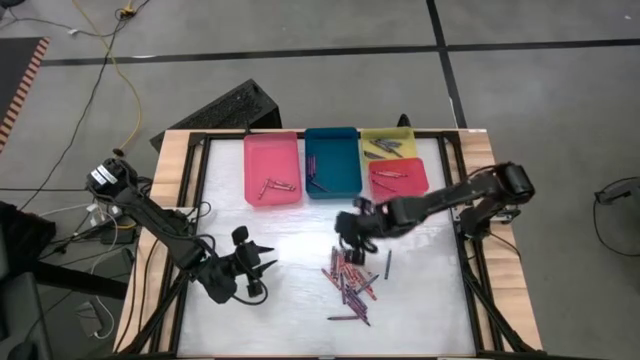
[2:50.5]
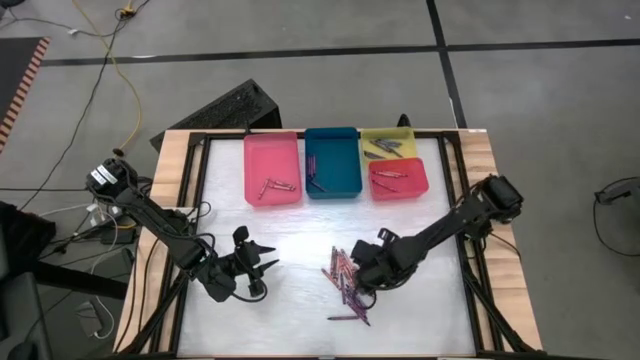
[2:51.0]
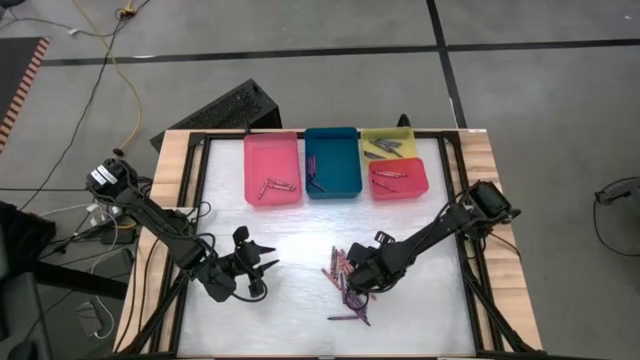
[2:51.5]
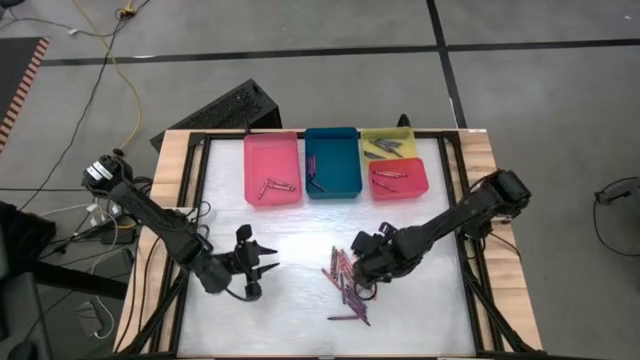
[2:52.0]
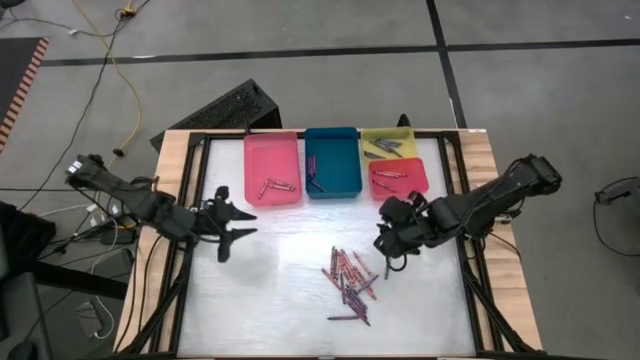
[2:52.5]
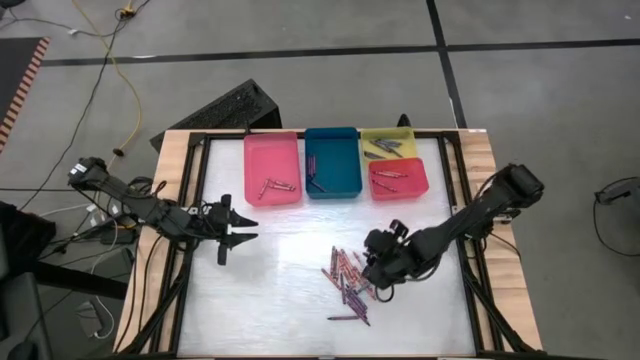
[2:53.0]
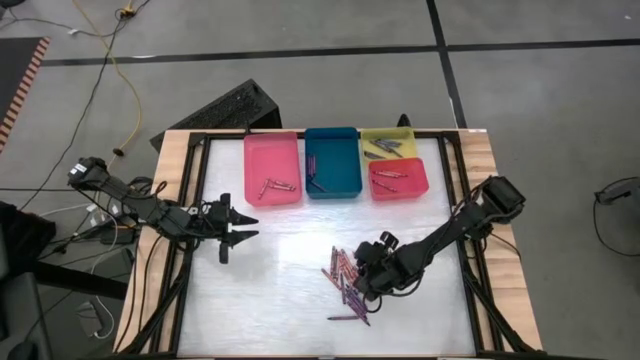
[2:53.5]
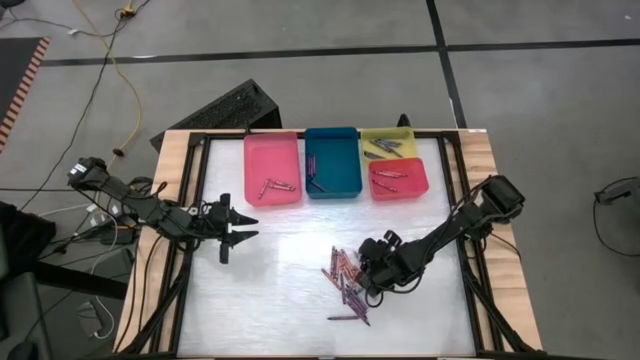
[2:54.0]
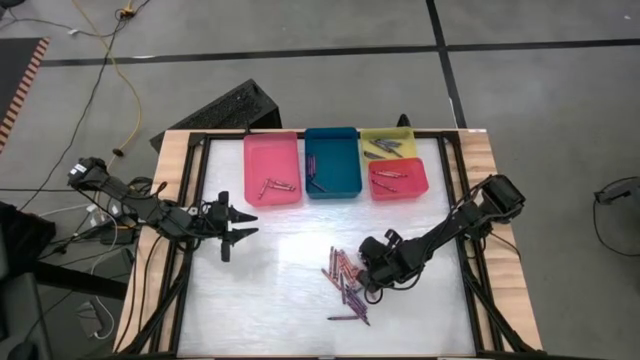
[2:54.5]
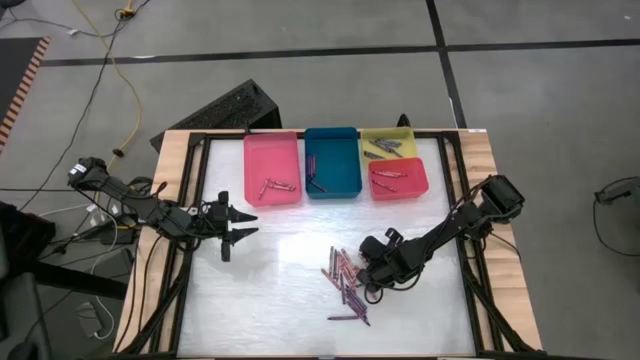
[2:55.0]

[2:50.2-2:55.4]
Task: Sort crayons
Put the pink crayon into the pink bin

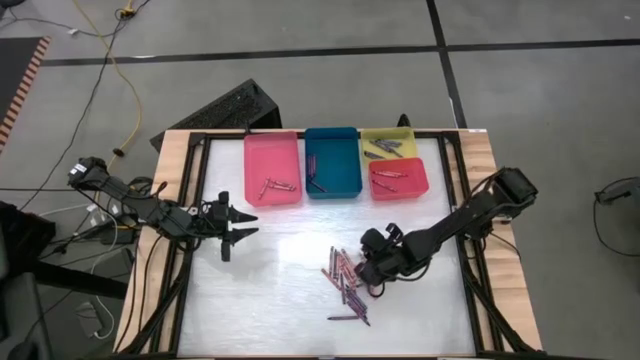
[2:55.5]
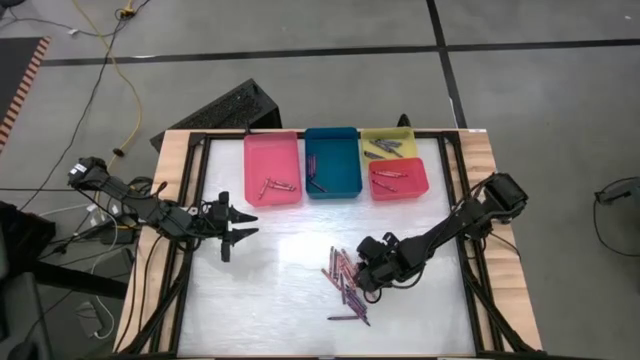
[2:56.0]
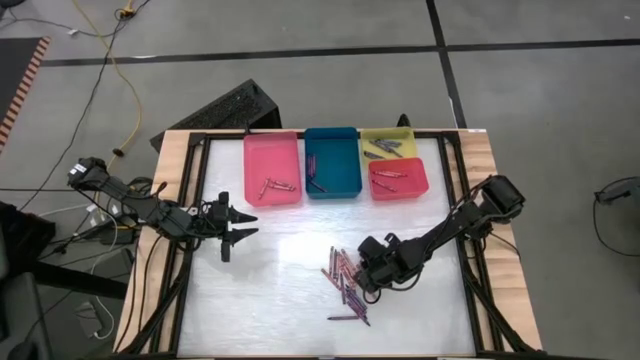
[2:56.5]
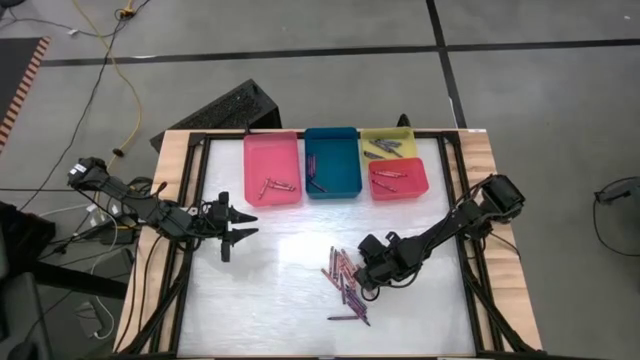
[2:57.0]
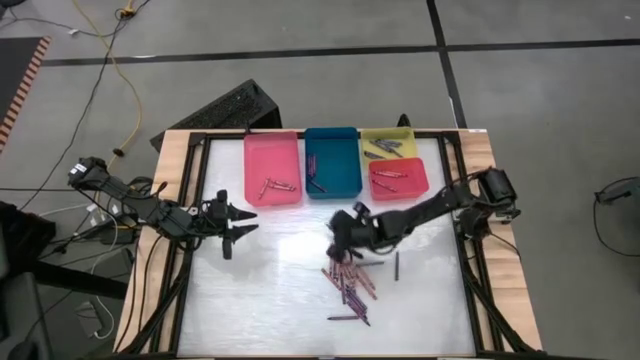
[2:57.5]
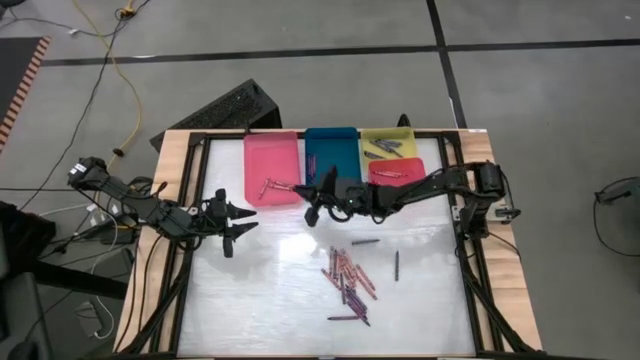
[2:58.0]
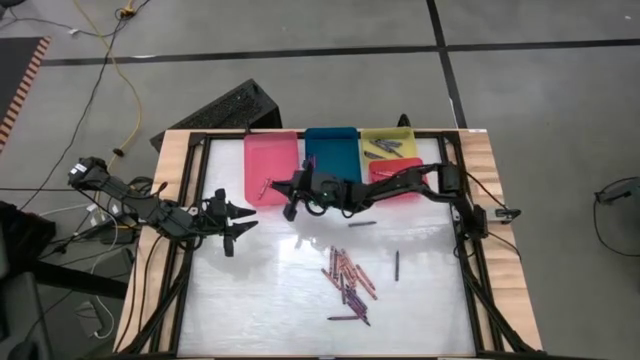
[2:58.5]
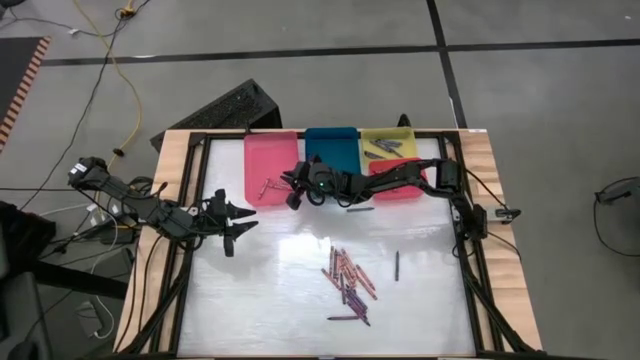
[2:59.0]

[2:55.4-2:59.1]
Put the pink crayon into the pink bin

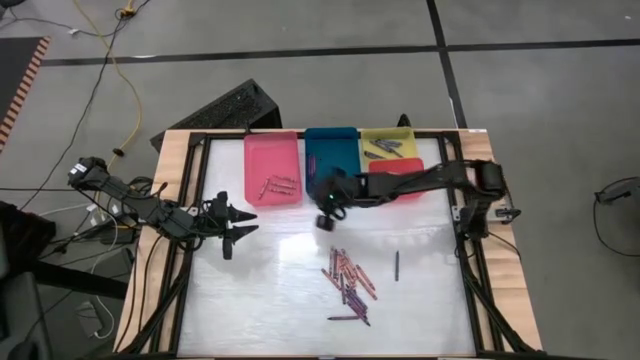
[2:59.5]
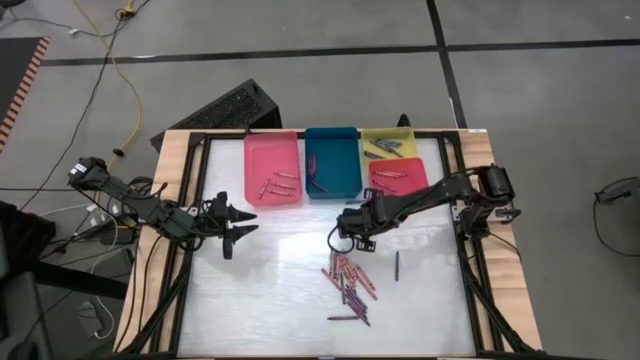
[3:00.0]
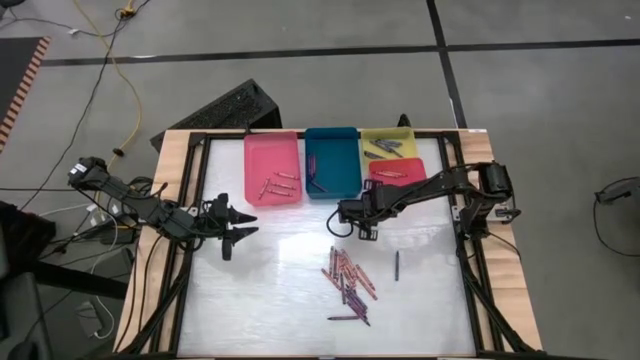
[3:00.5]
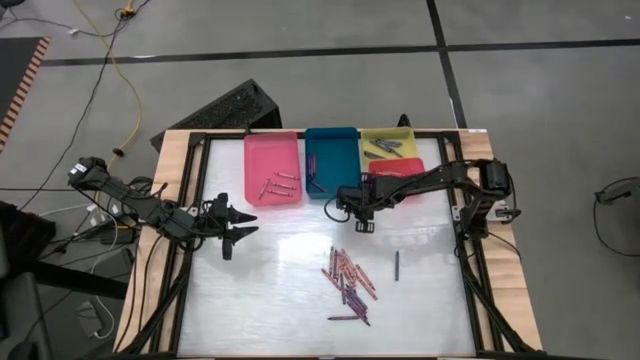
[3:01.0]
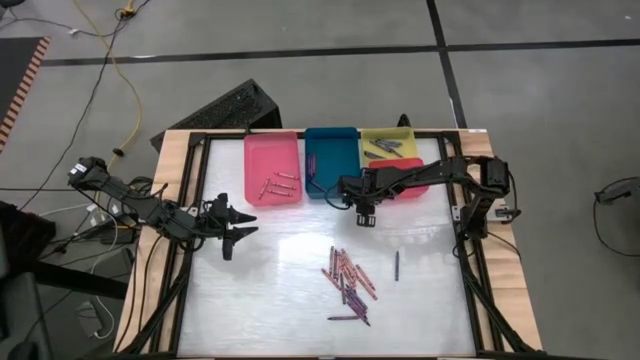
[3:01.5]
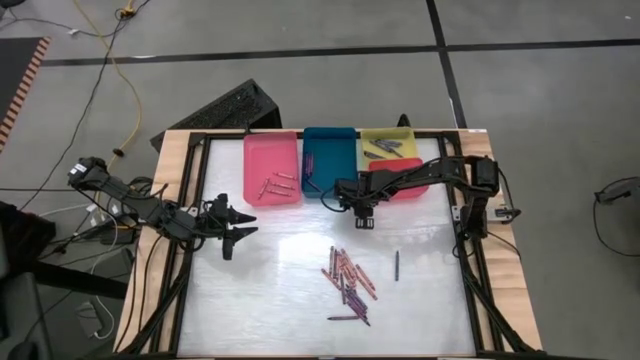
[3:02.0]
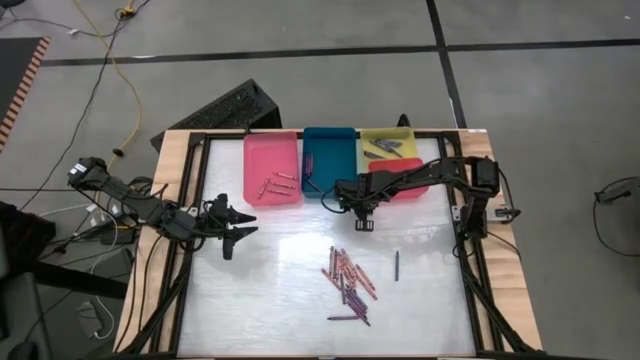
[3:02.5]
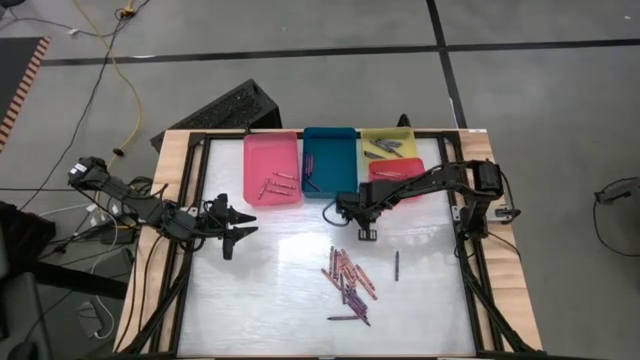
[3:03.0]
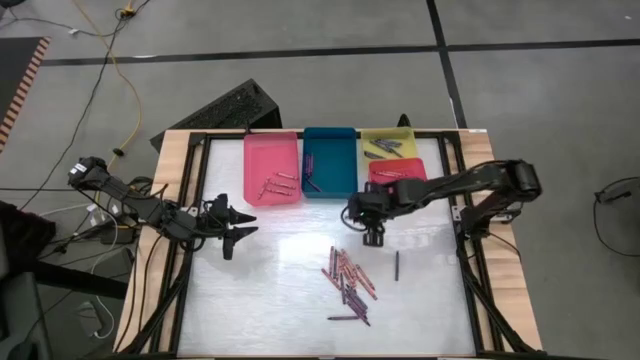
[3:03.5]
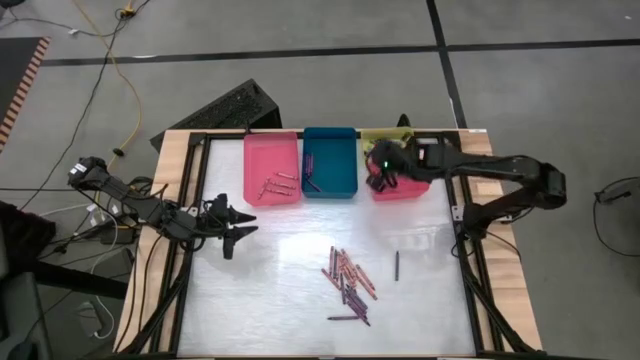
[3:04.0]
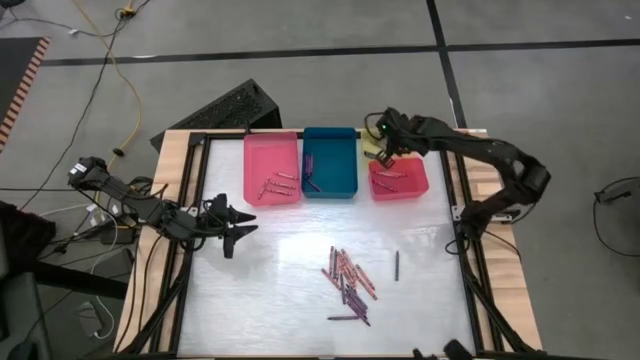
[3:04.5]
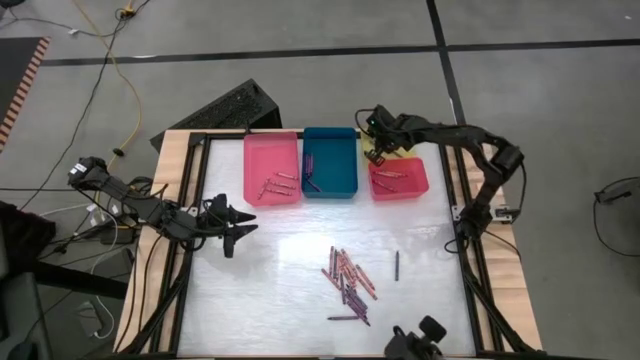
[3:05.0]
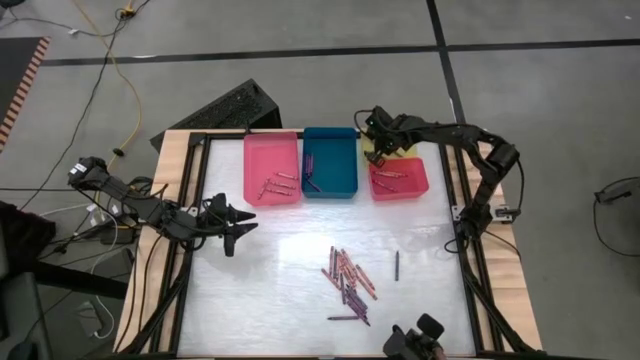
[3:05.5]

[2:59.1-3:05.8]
Put the blue crayon into the yellow bin

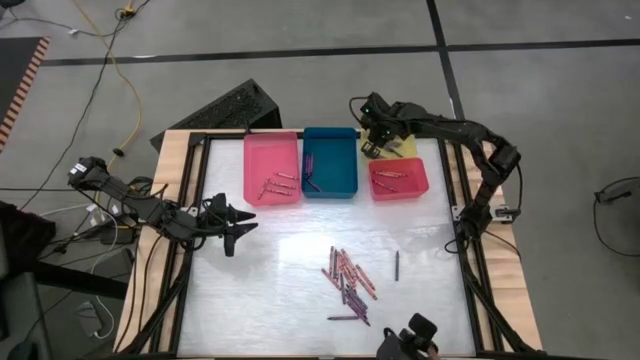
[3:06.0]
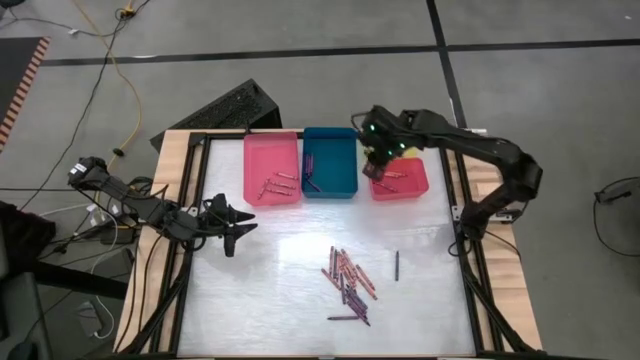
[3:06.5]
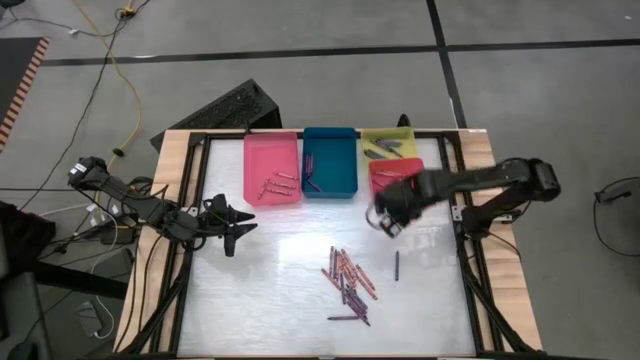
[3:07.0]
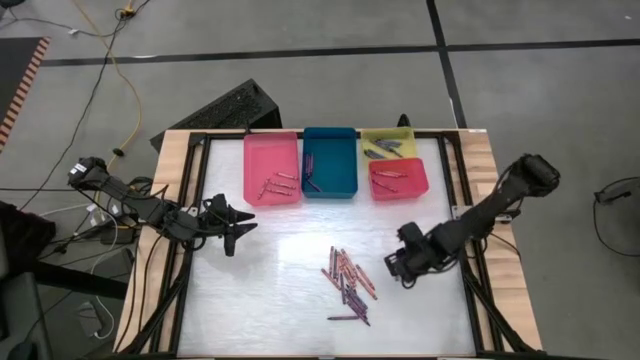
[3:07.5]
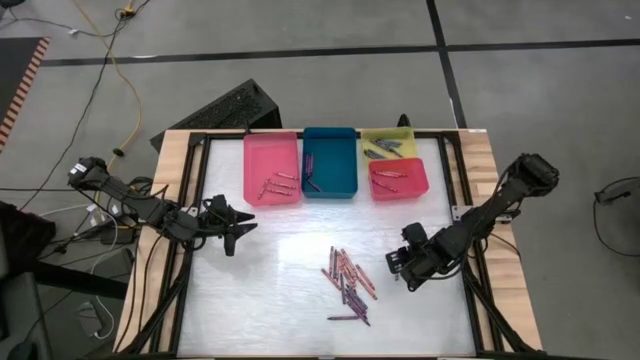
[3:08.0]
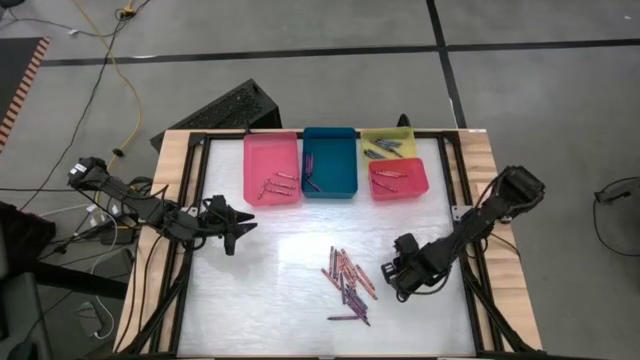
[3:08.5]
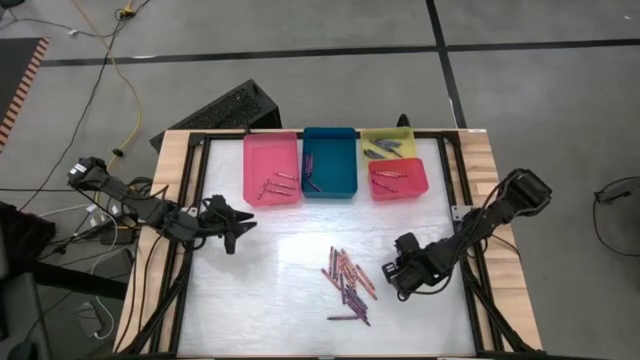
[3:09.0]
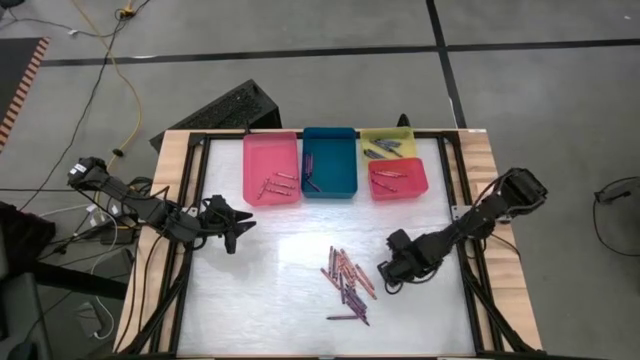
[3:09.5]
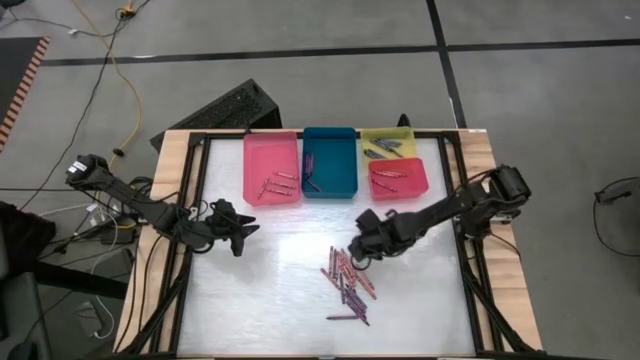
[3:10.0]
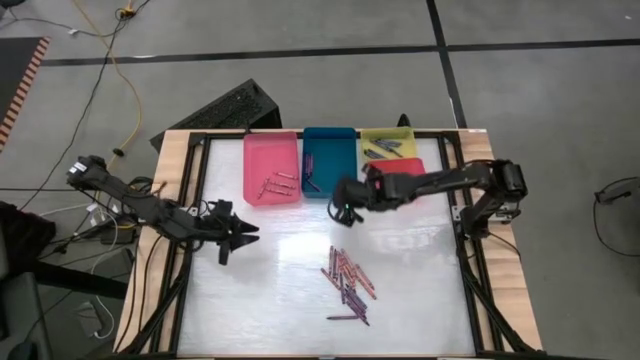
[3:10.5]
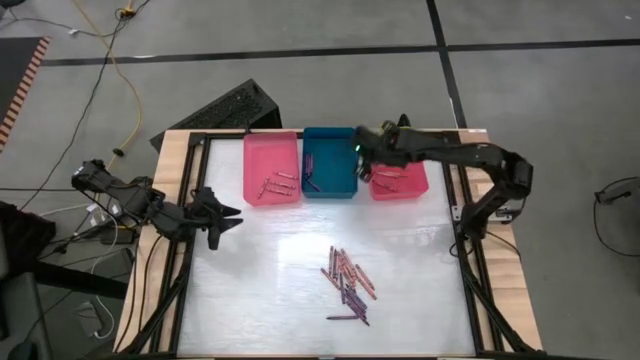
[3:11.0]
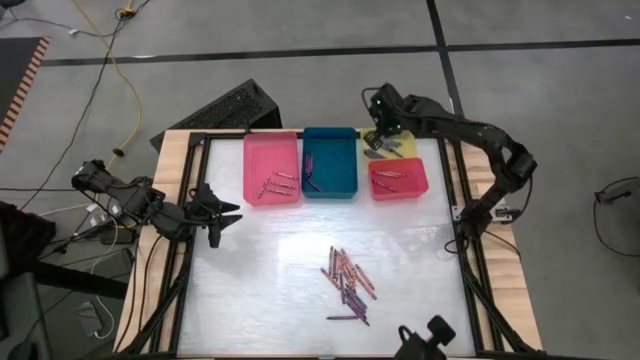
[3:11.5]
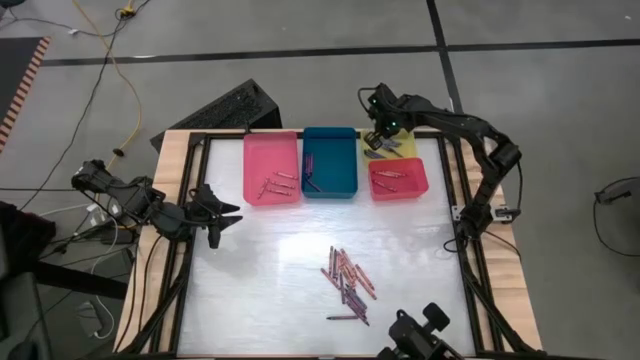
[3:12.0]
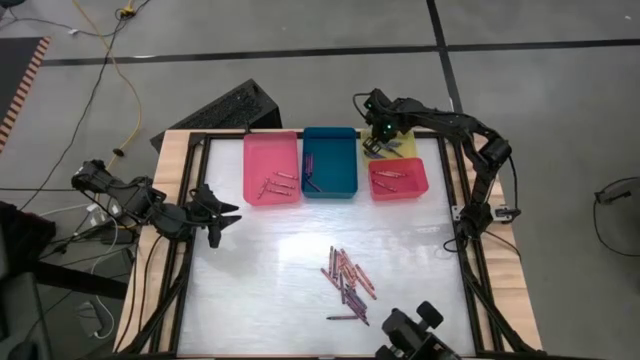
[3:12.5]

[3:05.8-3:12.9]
Put the blue crayon into the yellow bin
